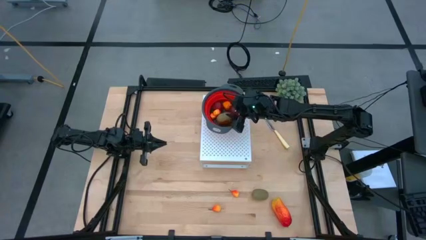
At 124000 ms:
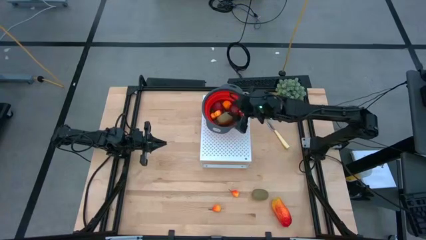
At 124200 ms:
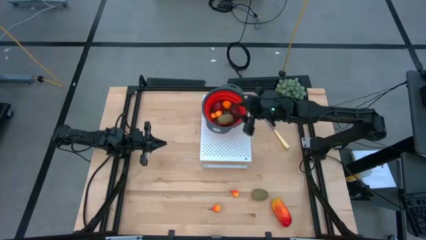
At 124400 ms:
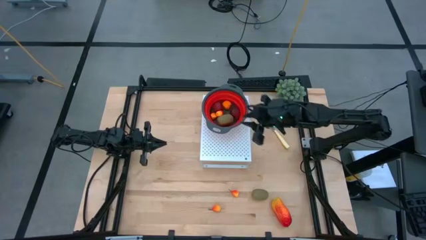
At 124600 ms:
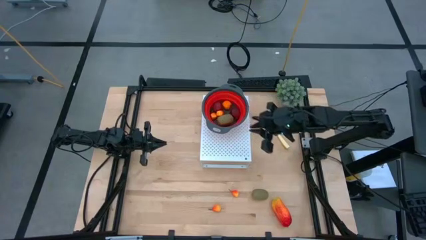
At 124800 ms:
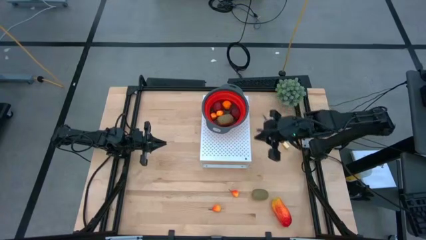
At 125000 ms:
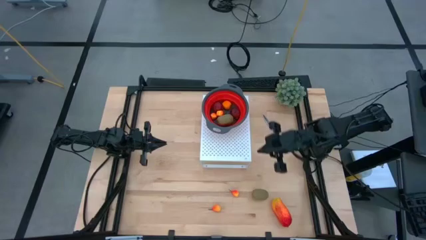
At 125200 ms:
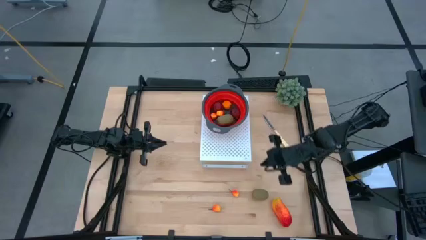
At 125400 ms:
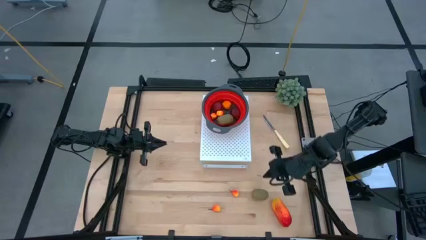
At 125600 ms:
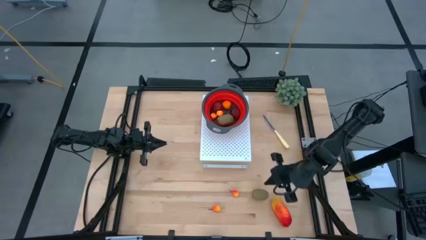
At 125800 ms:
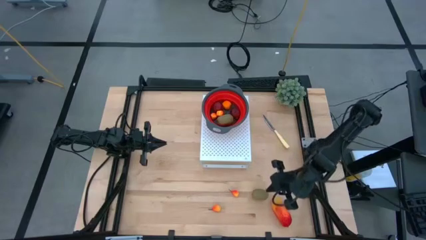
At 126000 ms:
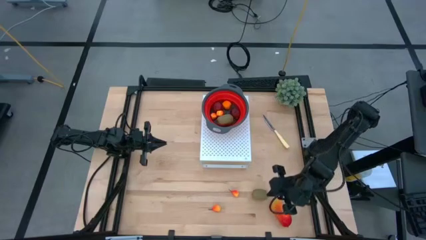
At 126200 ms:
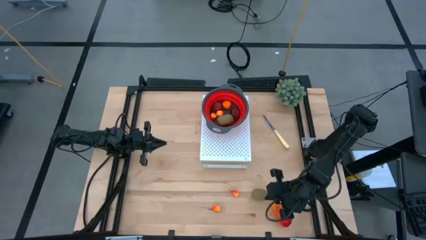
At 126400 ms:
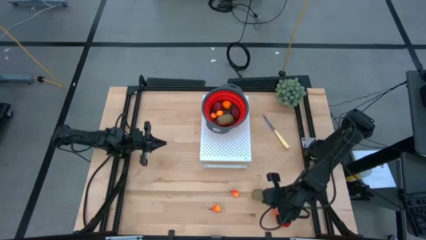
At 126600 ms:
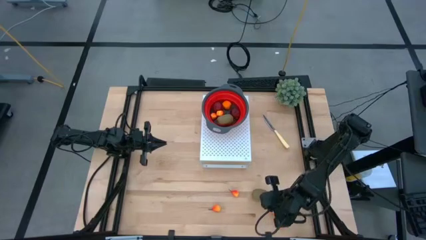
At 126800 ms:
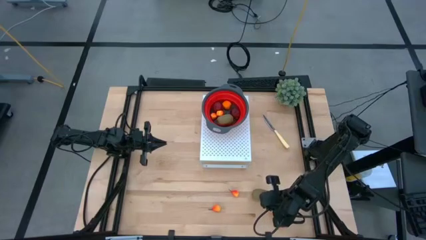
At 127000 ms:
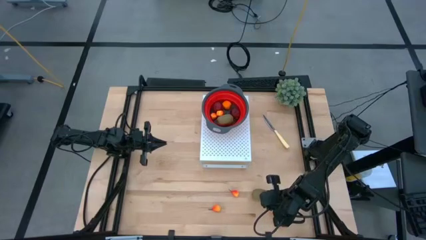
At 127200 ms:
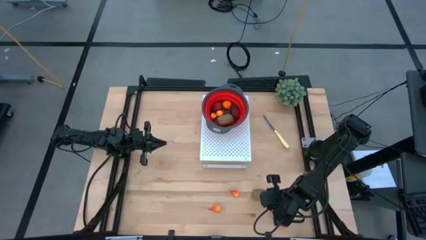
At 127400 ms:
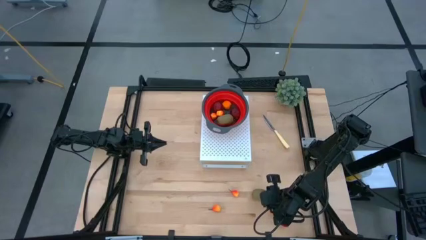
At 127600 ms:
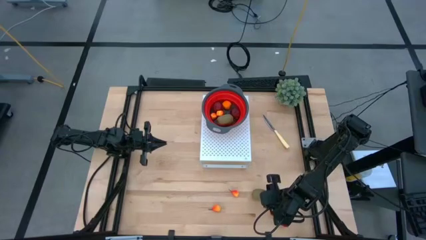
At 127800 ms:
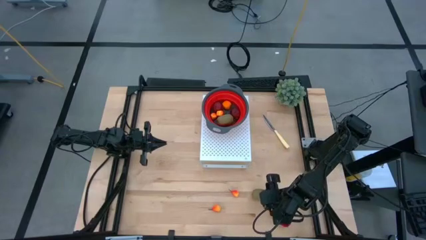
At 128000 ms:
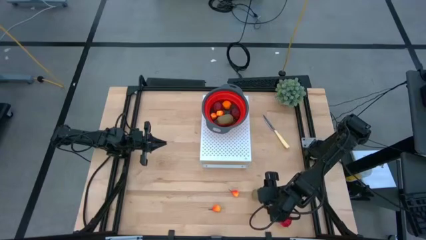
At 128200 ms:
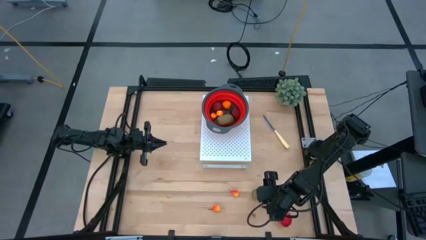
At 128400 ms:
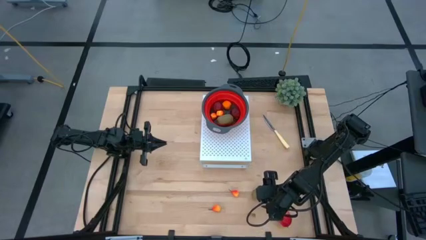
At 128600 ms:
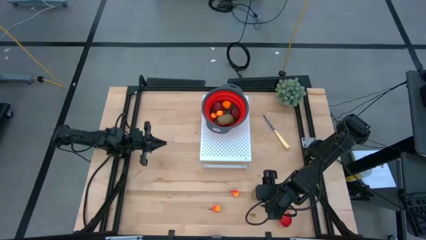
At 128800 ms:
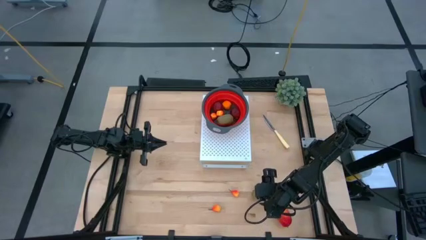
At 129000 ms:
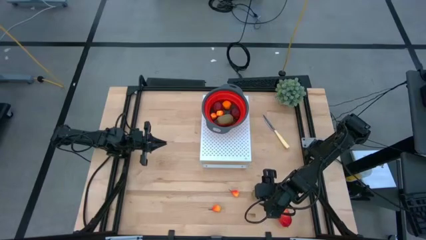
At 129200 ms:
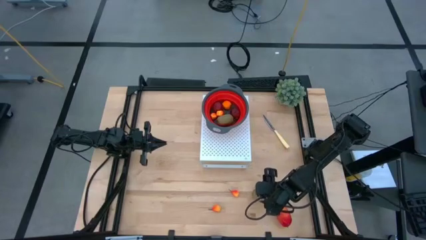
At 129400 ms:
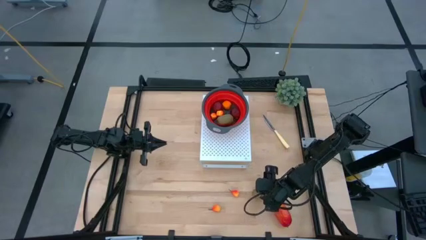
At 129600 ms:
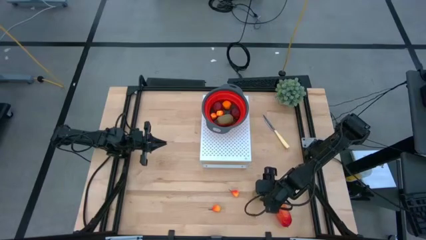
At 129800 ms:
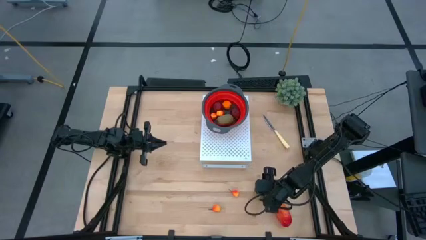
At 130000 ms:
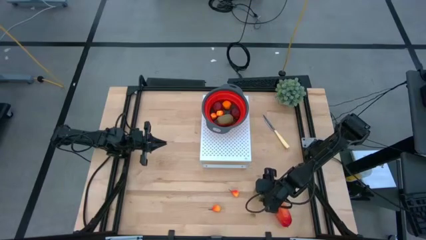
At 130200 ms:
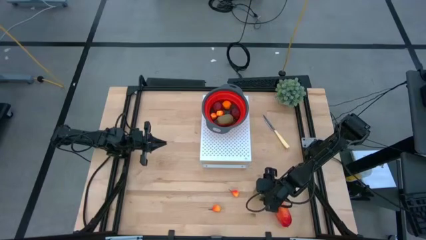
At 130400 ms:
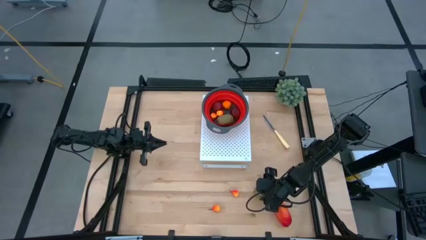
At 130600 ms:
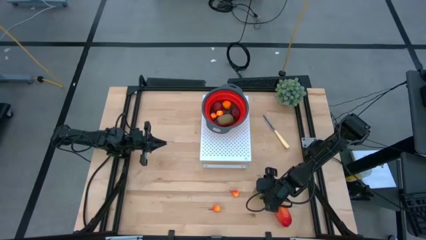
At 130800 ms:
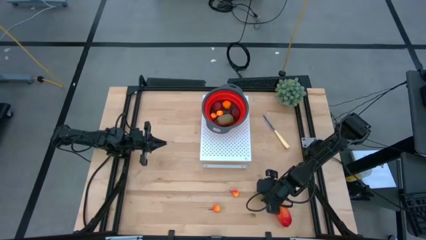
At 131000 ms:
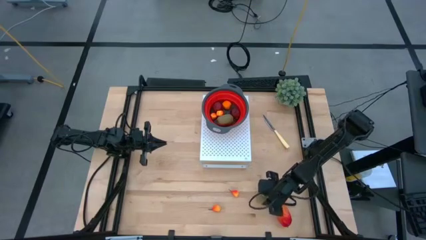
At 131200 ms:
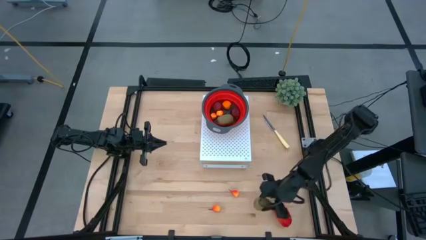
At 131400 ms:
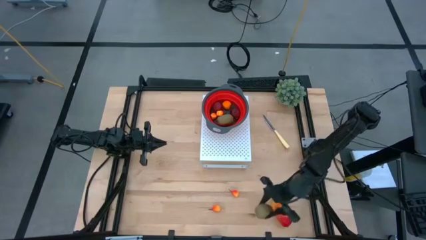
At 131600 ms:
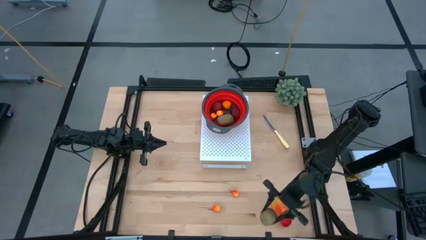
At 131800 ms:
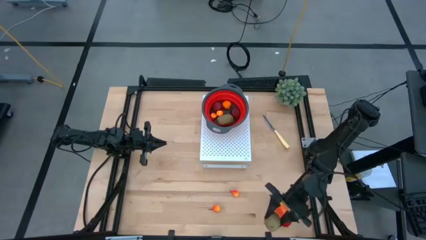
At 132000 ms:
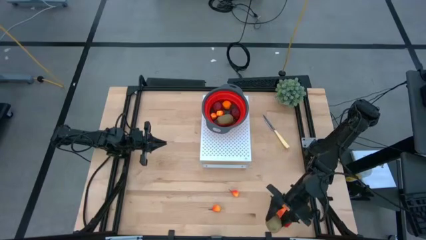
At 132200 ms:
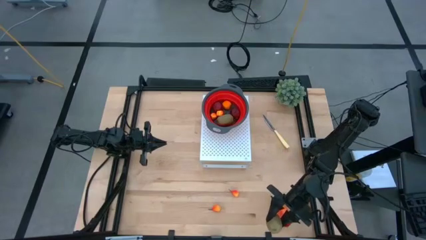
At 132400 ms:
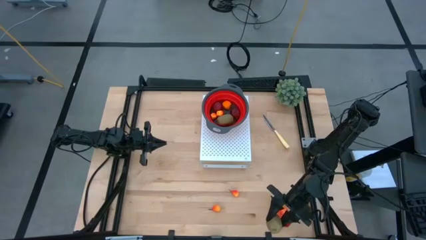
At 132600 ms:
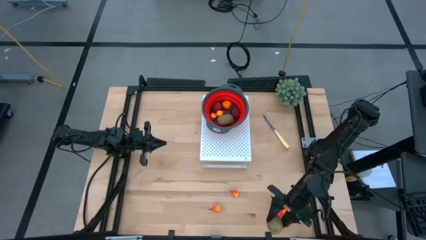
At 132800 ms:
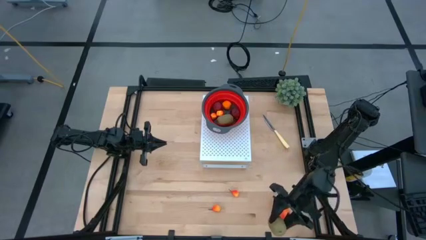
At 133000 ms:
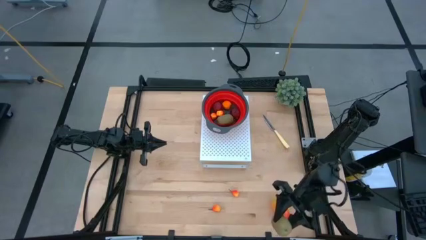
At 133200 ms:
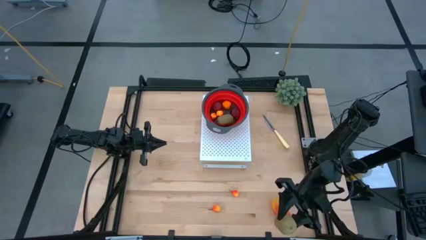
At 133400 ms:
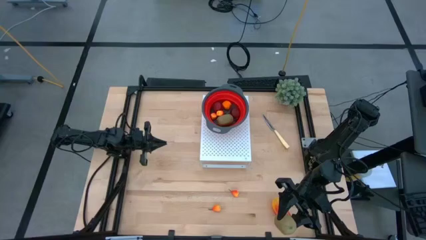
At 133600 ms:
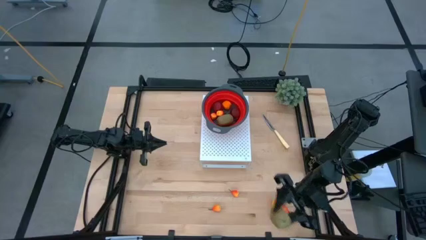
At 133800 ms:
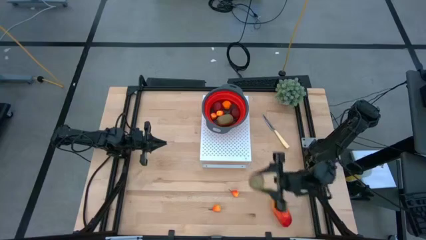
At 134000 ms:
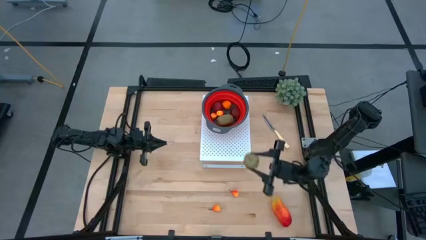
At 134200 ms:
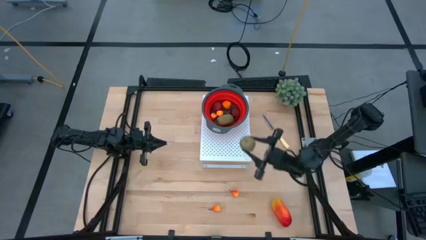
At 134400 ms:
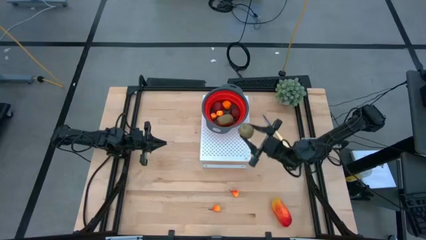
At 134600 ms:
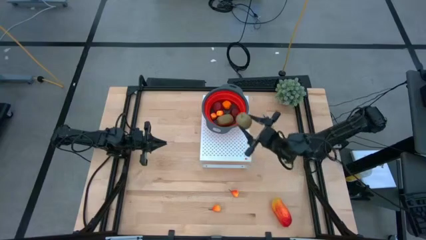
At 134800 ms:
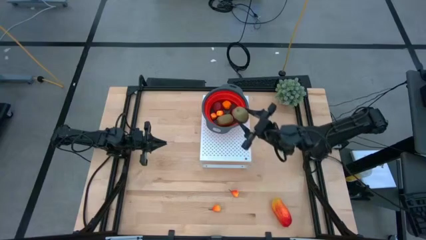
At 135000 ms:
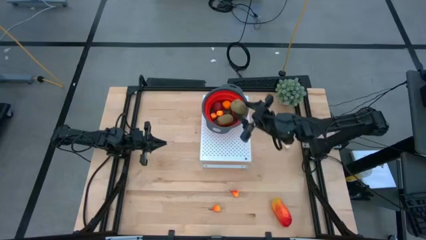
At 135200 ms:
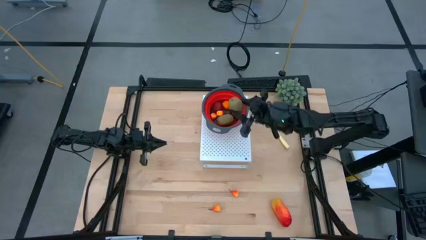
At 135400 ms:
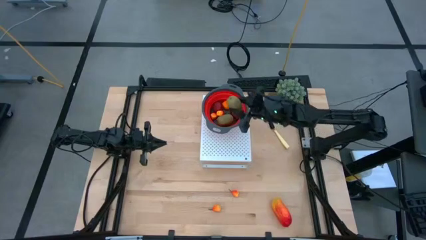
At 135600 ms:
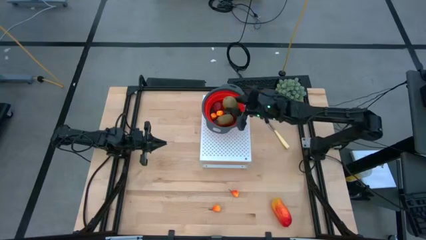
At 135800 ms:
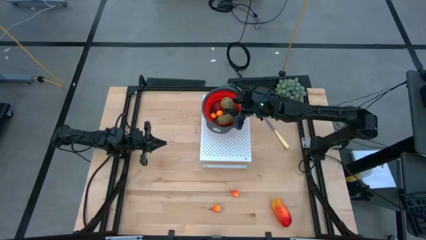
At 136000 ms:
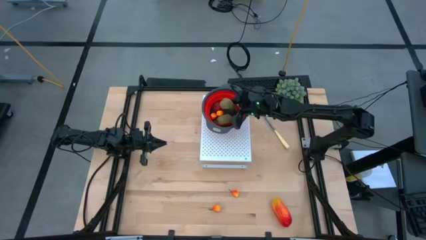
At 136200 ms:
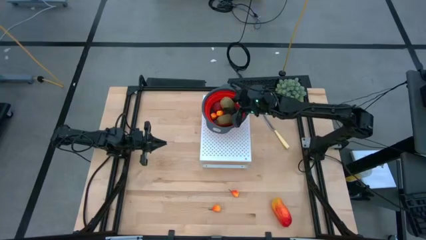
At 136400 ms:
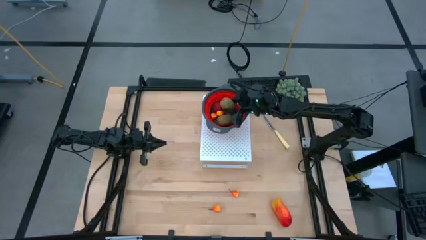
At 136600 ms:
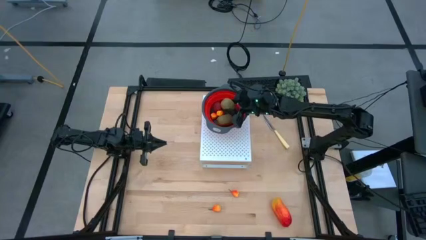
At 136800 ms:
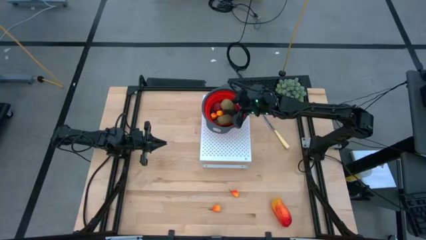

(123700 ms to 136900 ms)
Task: Pick & Place Fruit
Put the green kiwi into the red strainer bowl

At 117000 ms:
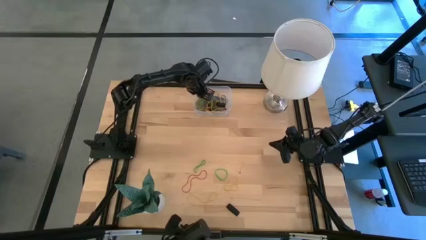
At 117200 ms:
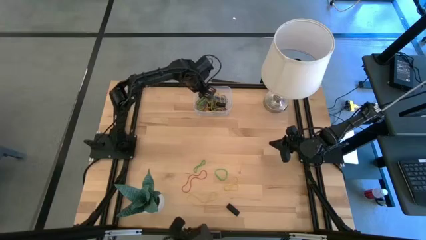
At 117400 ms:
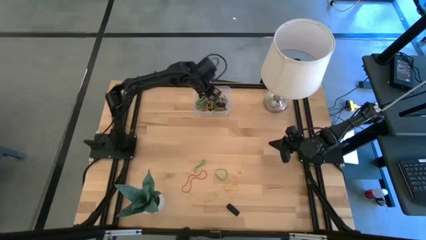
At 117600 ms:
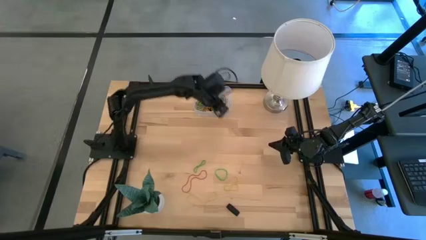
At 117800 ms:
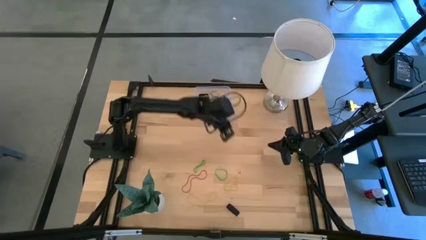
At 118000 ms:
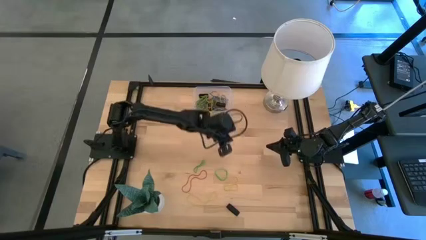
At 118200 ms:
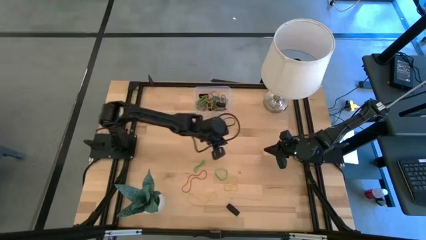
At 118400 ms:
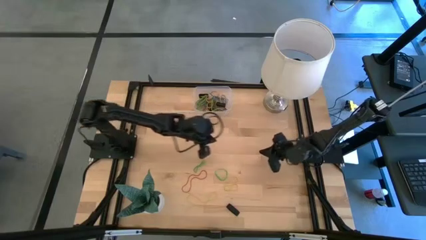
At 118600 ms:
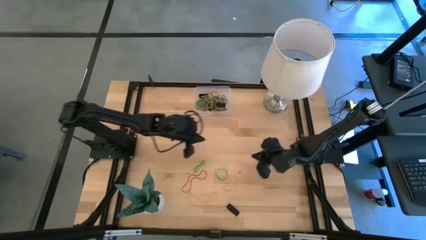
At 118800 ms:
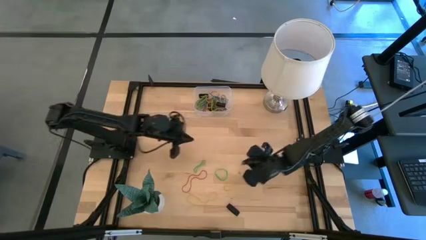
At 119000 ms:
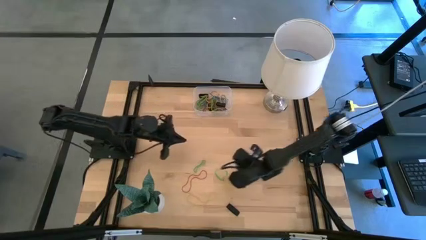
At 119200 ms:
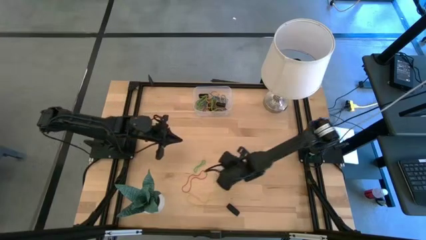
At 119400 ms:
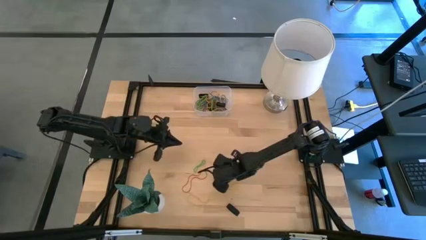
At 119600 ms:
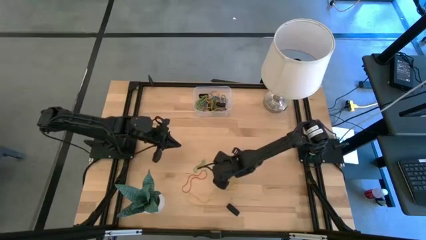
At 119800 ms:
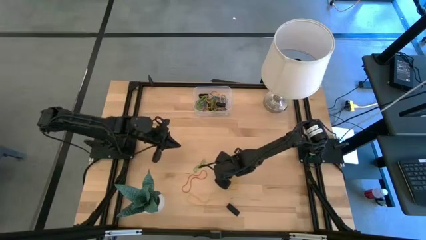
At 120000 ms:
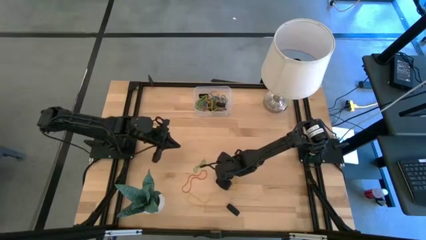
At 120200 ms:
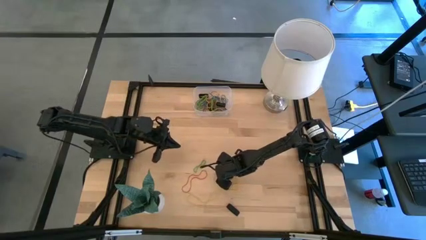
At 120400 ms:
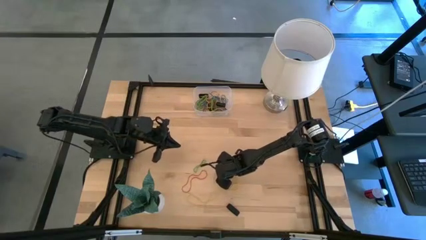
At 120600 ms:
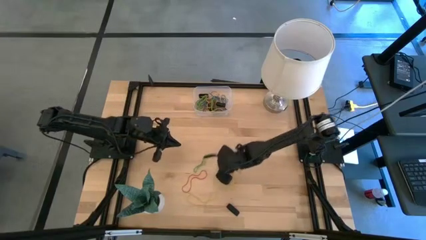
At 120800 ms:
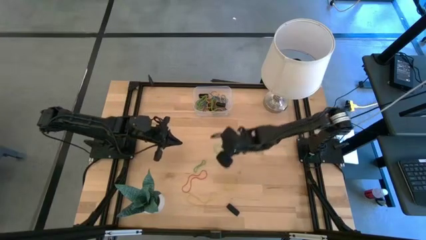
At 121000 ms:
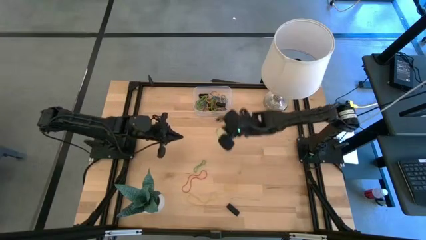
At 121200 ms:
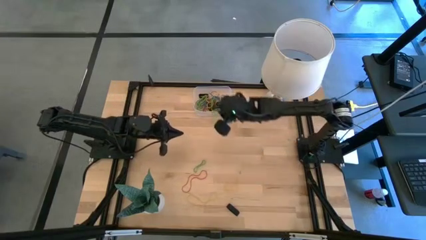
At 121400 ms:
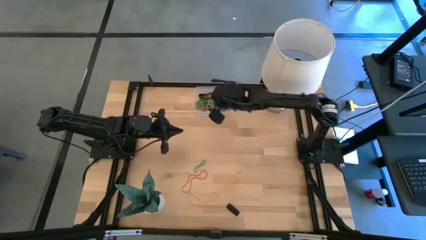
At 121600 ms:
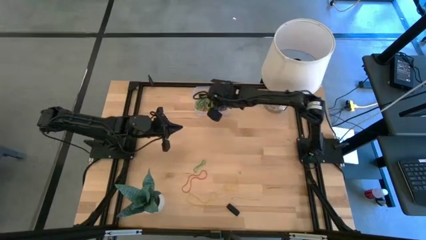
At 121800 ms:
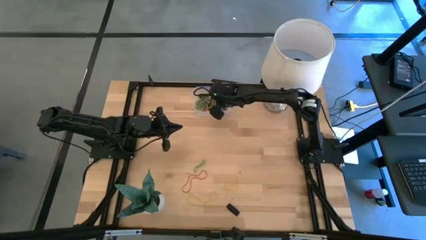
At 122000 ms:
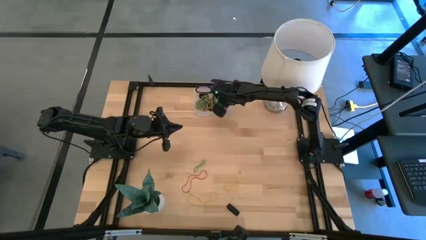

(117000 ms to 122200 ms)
Task: Pick and place rubber bands into bin
Put the green rubber band into the transparent bin
